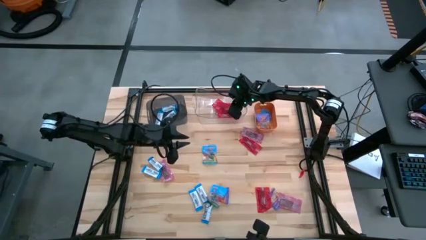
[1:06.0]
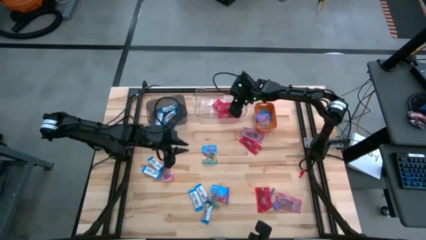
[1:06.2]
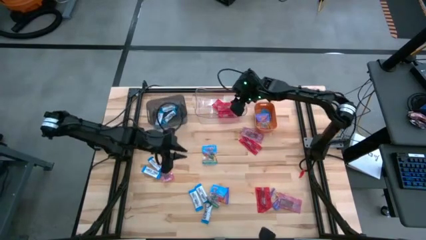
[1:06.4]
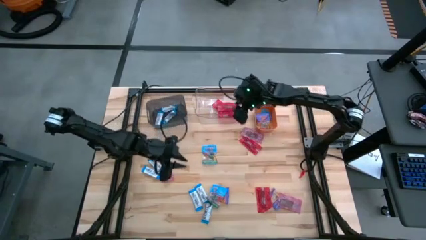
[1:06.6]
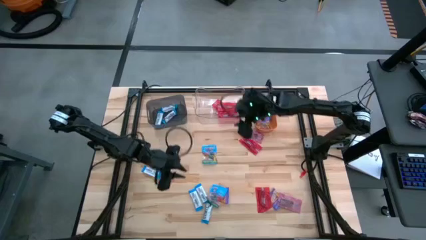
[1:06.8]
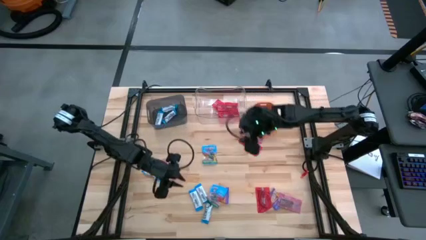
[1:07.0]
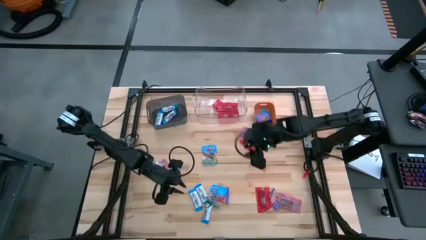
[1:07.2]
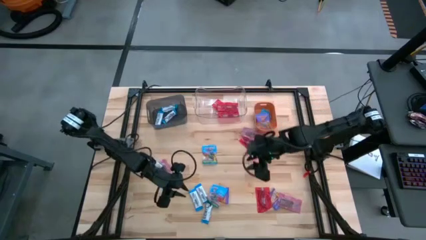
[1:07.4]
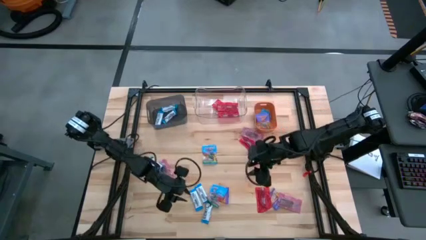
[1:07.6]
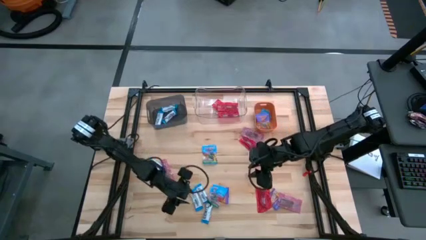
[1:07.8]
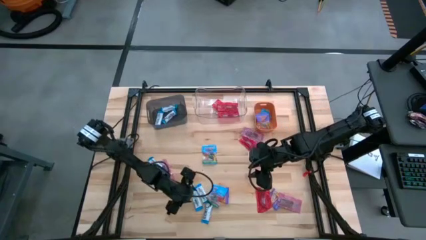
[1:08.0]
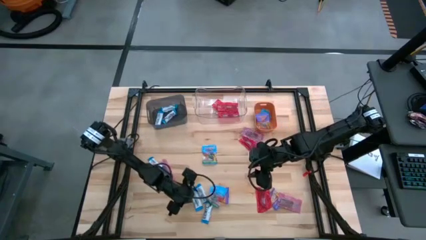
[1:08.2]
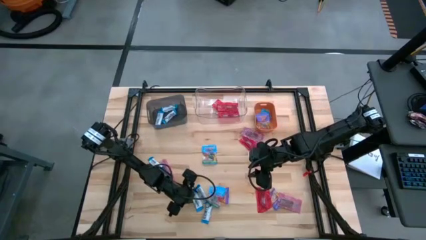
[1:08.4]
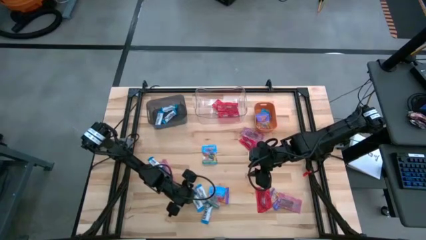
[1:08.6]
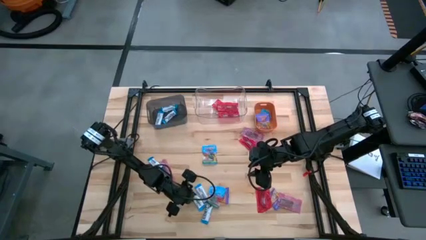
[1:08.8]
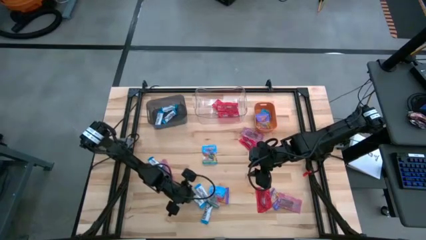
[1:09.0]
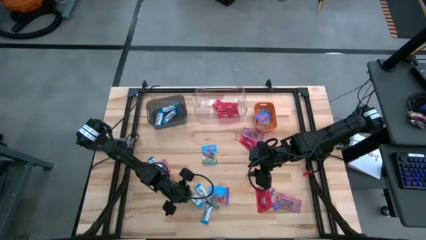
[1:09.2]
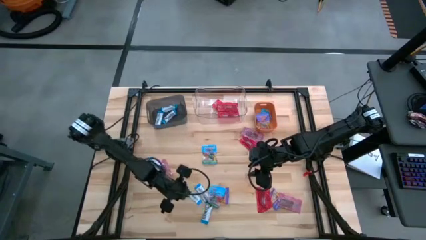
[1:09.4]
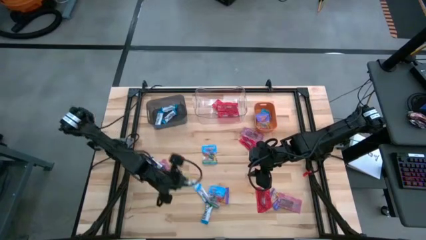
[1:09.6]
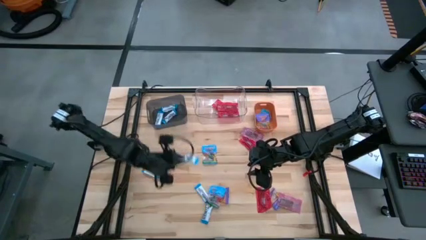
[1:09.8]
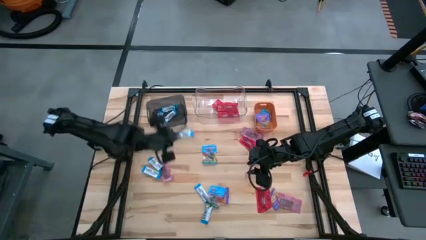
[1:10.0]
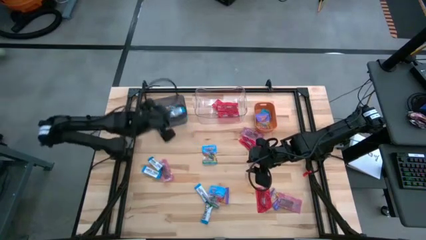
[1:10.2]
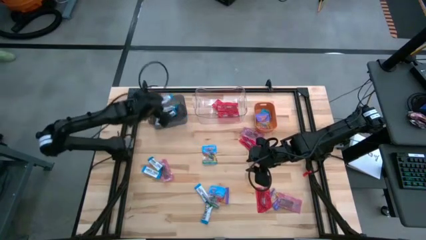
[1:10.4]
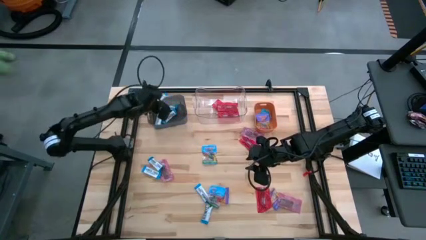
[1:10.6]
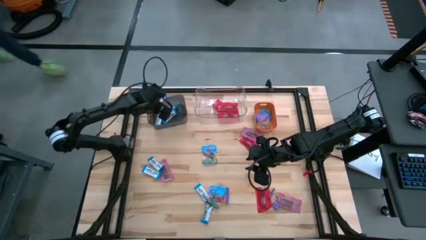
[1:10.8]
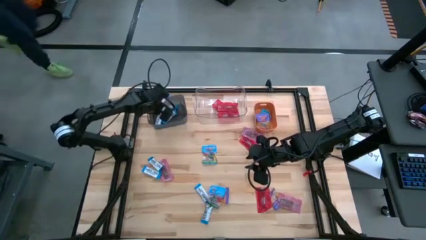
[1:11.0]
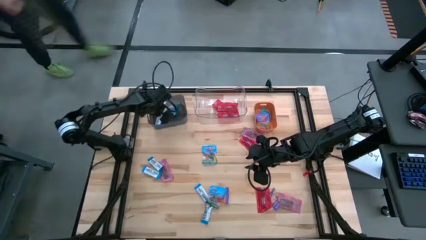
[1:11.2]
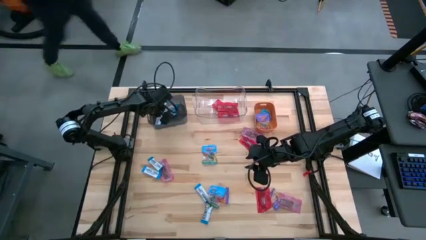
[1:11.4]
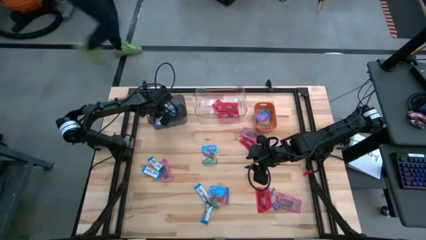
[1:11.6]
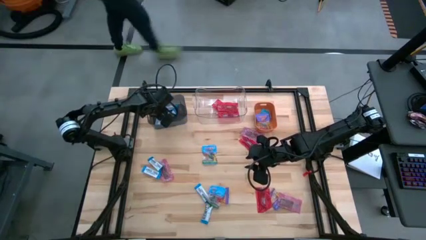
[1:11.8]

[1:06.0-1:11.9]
Task: Sort candy
Put the white chocolate into the black bin

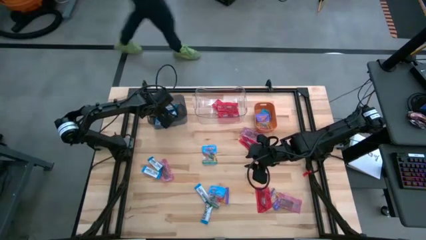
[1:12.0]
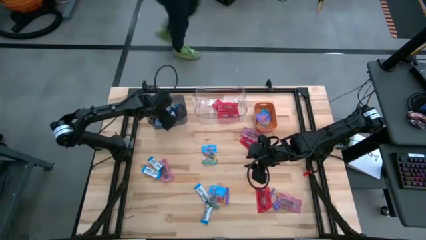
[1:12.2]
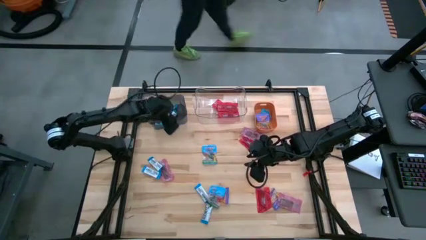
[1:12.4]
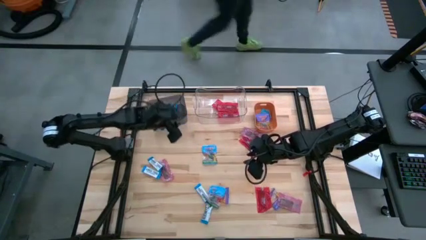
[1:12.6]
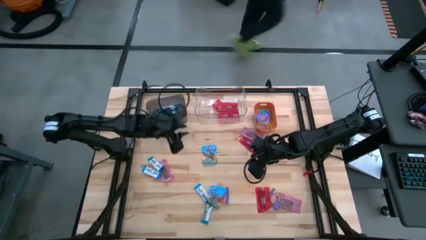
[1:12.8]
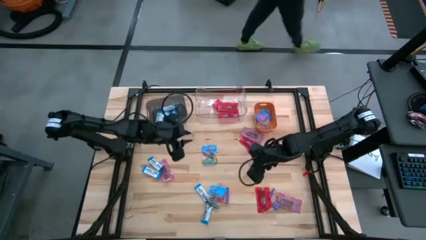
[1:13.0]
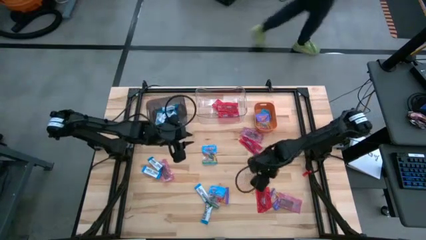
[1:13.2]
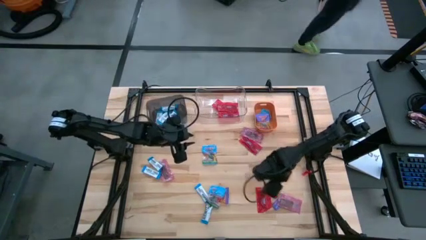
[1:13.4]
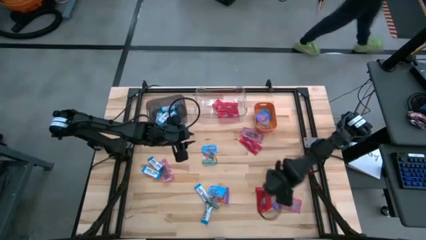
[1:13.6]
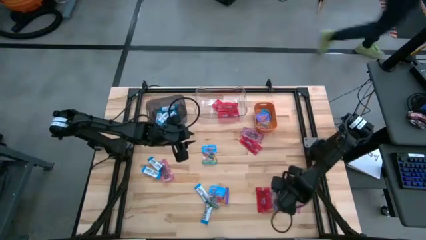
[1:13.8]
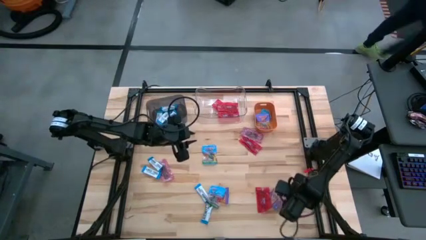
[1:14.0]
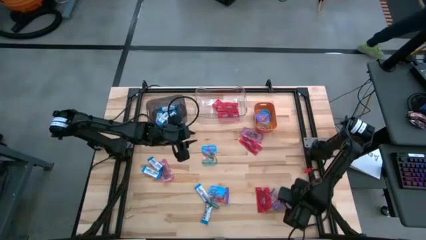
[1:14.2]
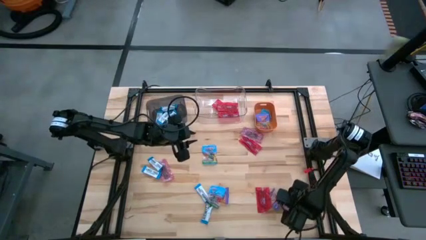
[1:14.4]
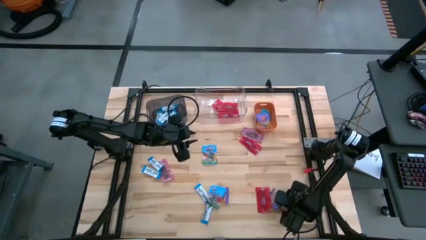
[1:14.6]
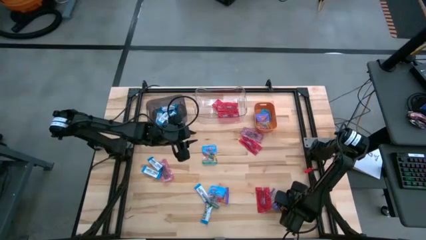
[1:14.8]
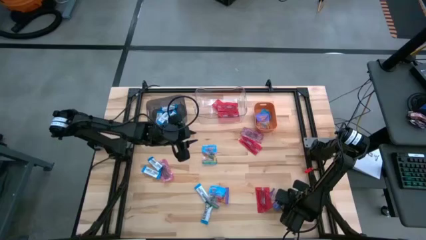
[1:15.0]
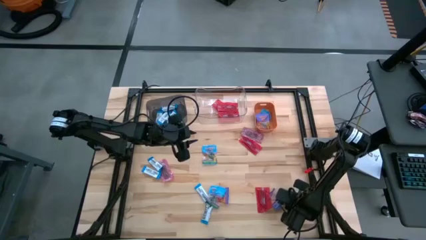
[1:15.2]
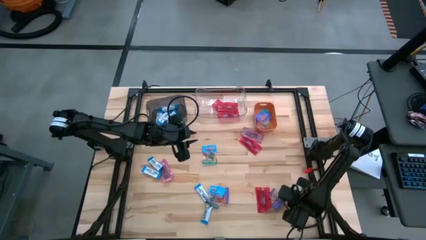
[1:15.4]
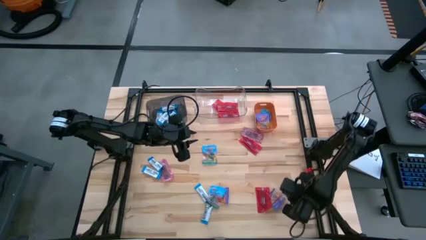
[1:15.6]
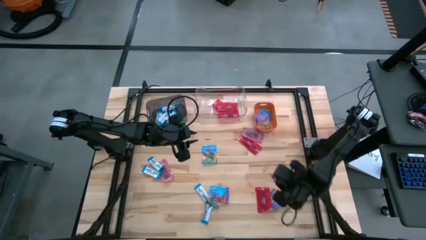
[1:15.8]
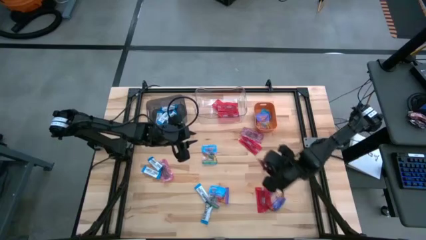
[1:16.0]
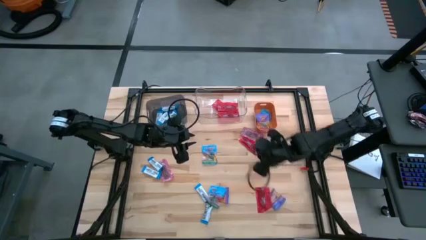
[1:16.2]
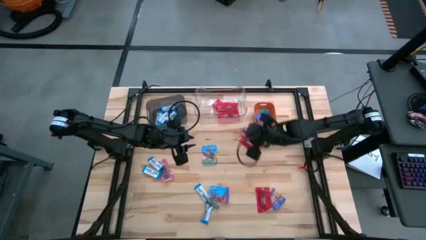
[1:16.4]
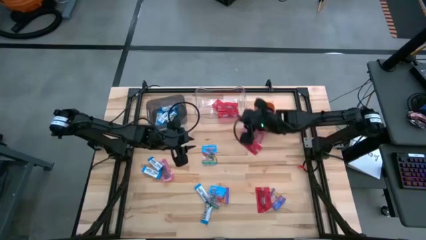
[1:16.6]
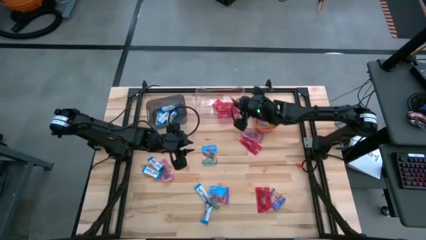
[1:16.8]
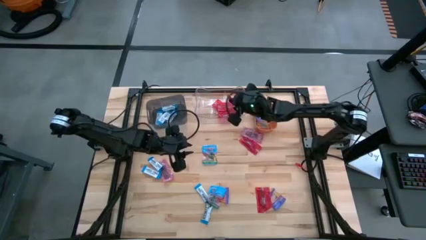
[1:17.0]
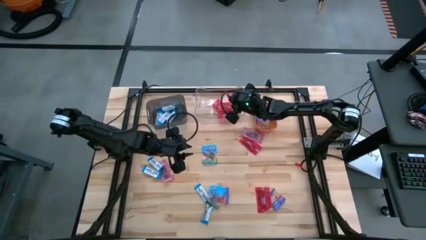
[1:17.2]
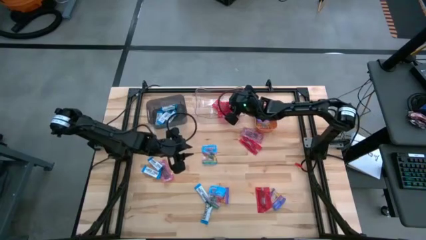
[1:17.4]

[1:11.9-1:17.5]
Put the red chocolate into the transparent bin

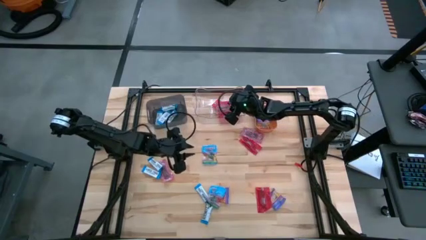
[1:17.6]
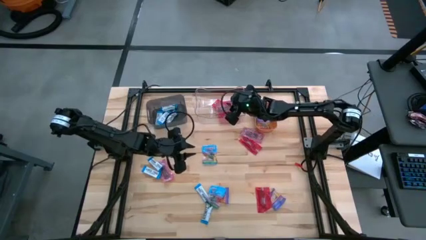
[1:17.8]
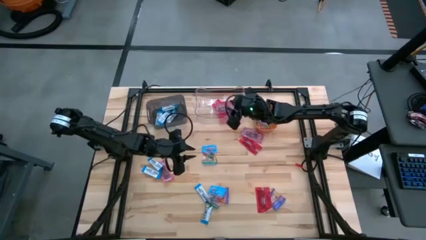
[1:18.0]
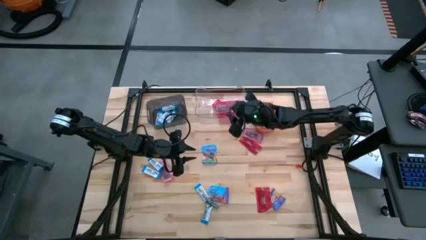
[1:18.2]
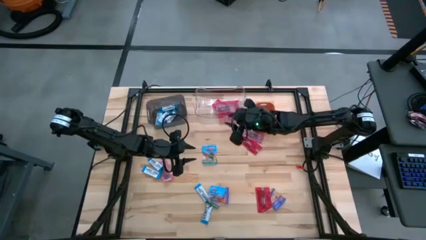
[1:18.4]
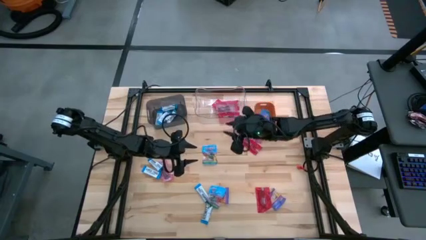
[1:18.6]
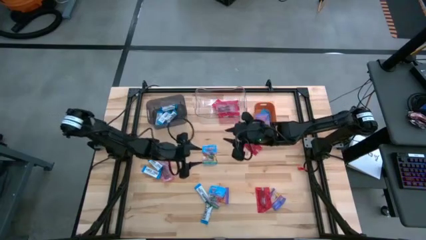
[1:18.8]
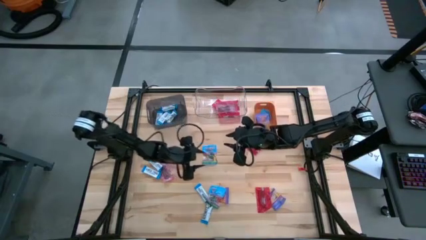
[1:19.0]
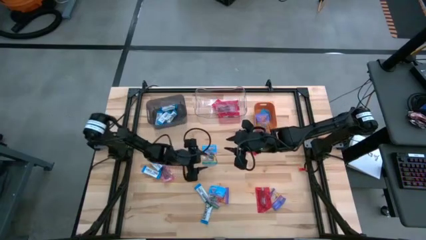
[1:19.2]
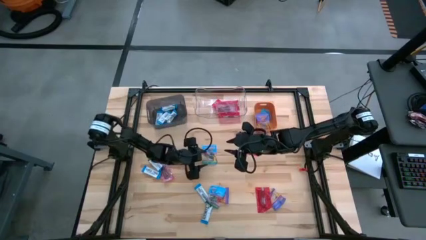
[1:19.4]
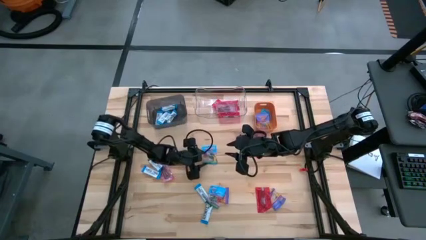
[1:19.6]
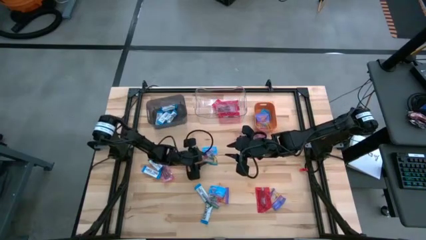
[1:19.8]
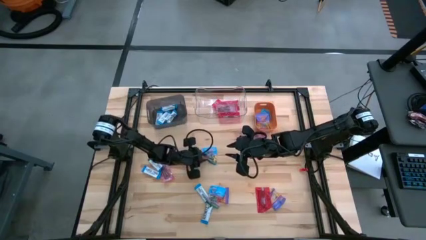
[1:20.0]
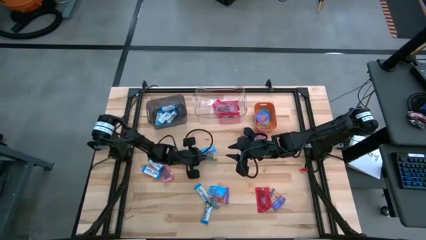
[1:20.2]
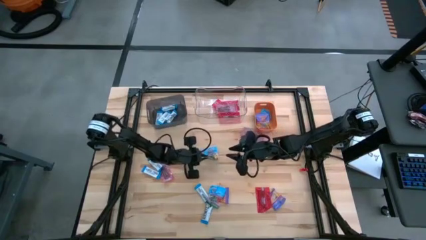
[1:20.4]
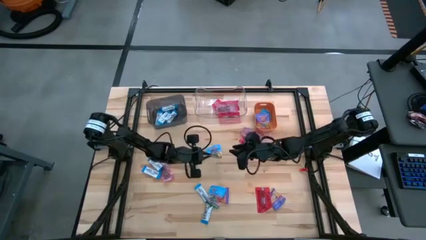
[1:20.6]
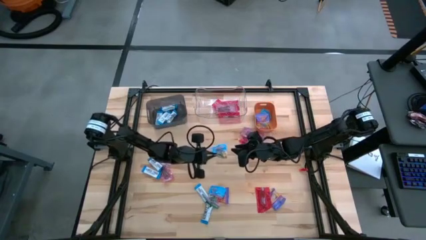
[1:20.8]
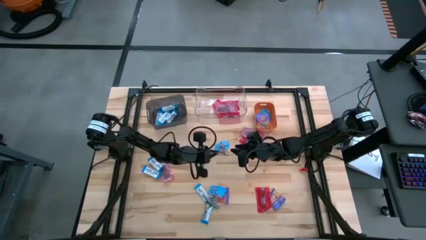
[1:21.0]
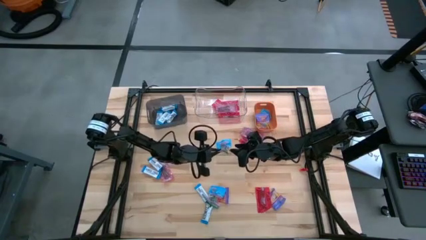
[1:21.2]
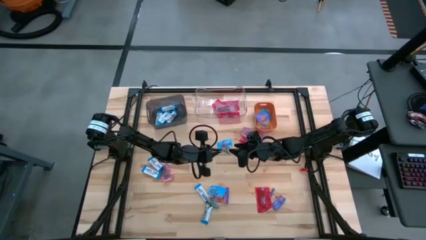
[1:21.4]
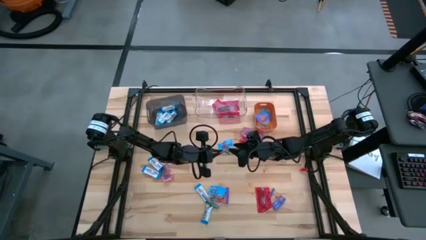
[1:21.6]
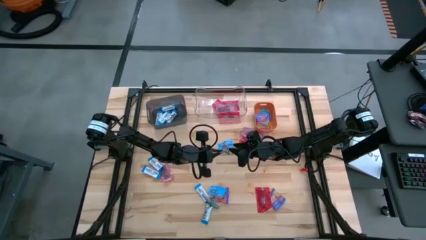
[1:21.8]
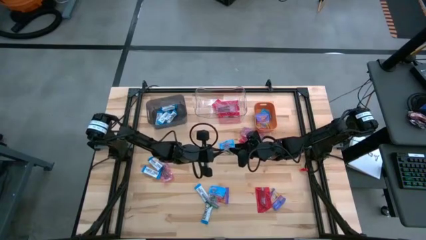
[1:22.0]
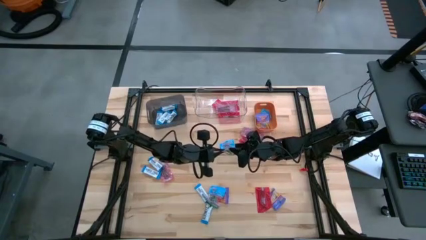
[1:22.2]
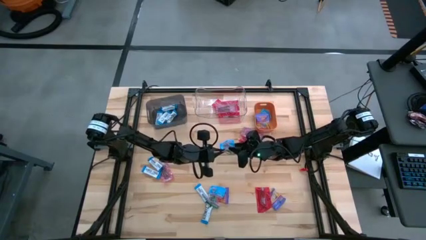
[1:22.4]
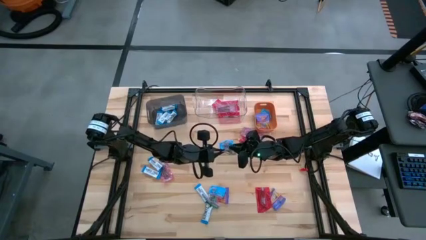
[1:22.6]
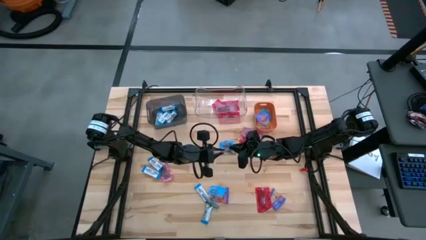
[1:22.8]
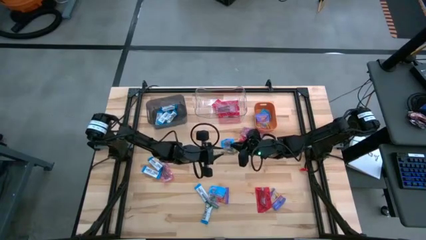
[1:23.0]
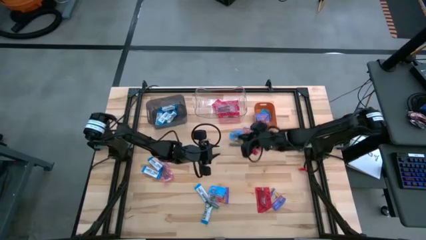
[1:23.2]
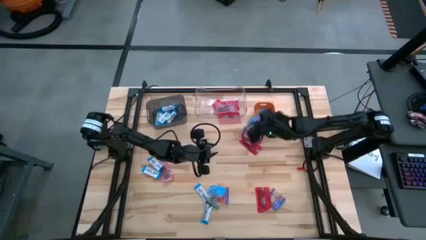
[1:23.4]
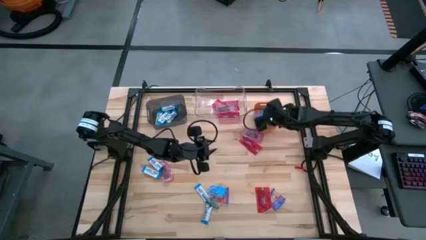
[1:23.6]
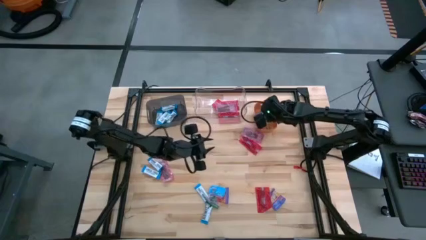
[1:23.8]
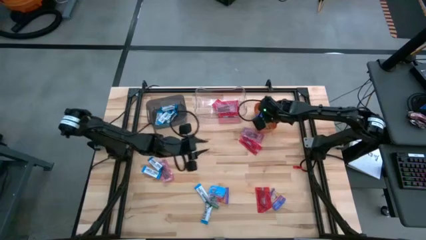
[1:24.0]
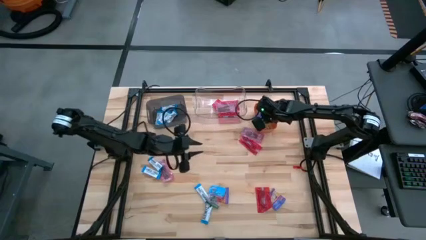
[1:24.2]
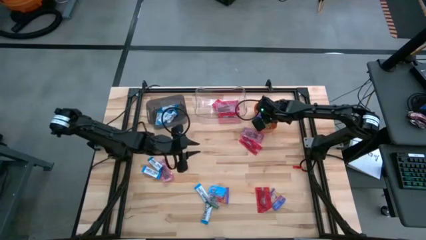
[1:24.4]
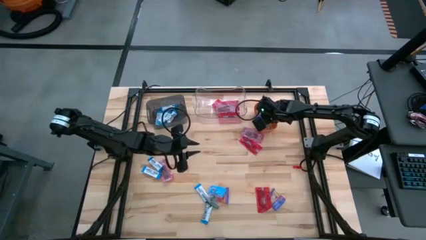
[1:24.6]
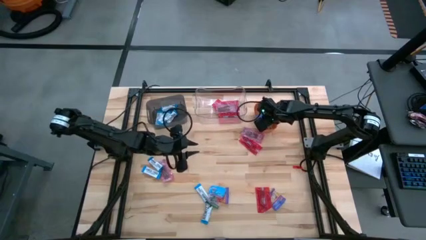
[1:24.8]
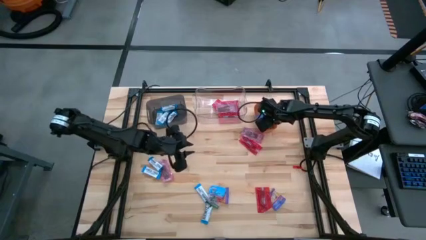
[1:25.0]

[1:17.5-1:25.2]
Put the blue gummy into the orange bin
